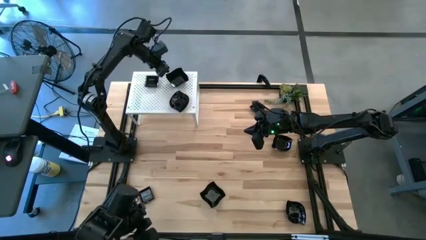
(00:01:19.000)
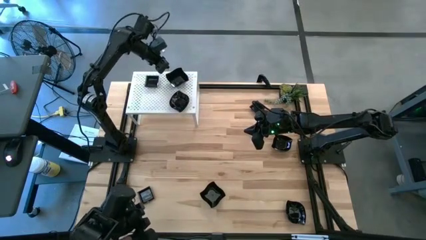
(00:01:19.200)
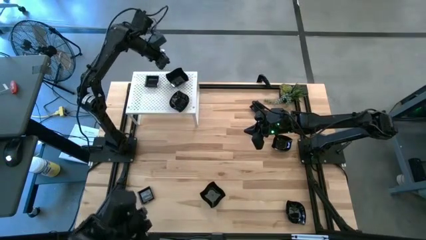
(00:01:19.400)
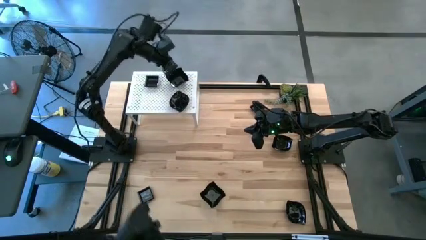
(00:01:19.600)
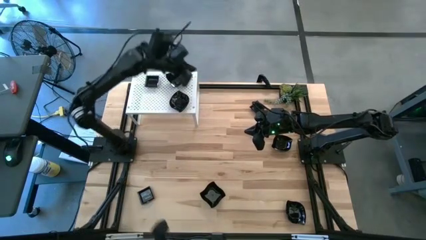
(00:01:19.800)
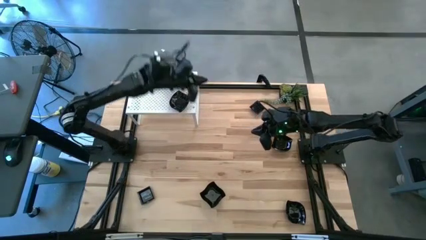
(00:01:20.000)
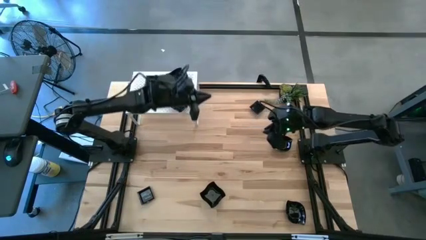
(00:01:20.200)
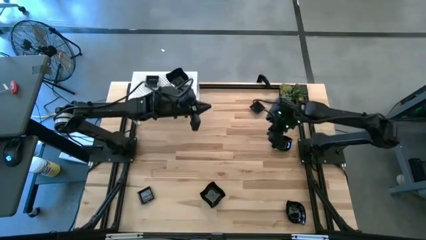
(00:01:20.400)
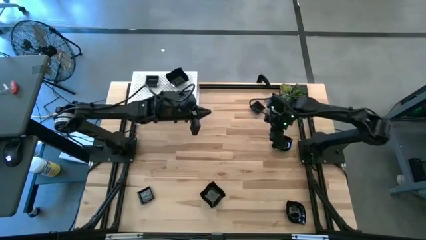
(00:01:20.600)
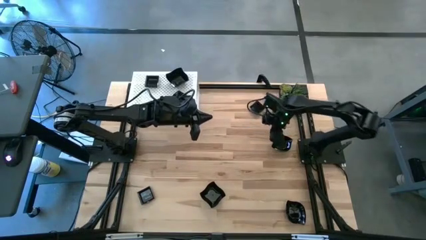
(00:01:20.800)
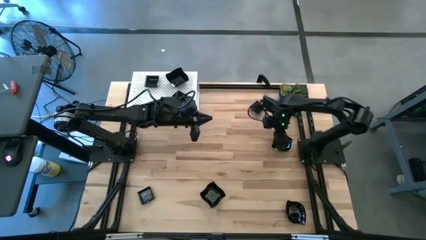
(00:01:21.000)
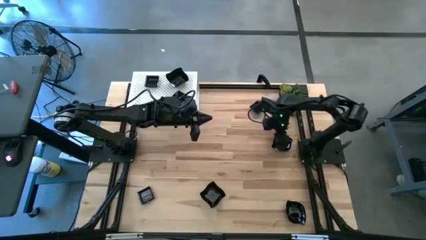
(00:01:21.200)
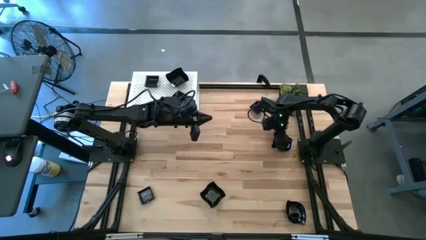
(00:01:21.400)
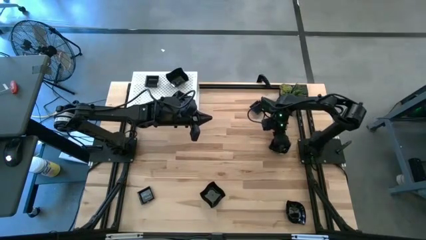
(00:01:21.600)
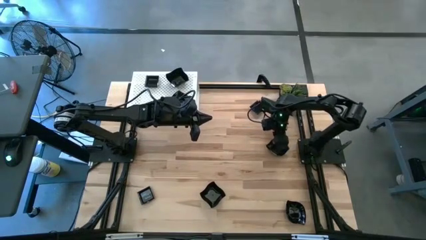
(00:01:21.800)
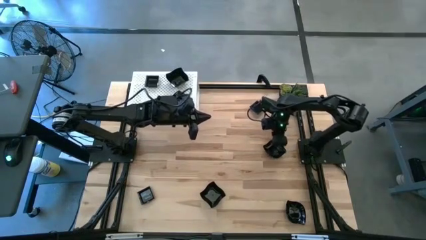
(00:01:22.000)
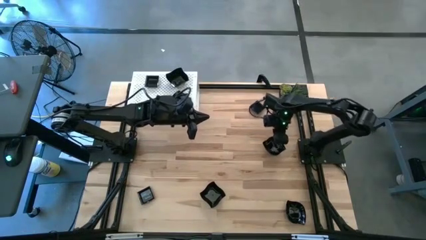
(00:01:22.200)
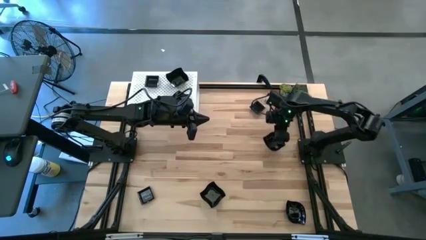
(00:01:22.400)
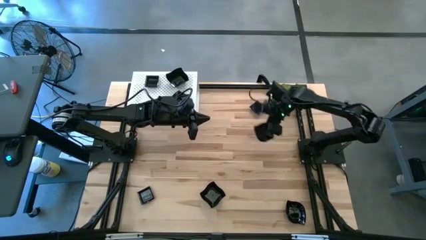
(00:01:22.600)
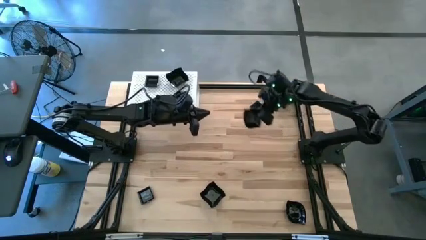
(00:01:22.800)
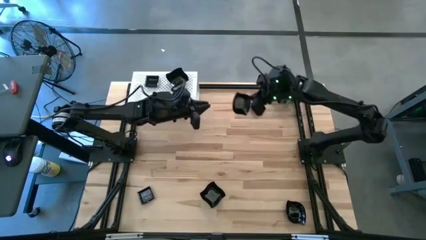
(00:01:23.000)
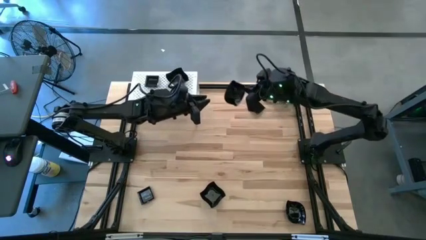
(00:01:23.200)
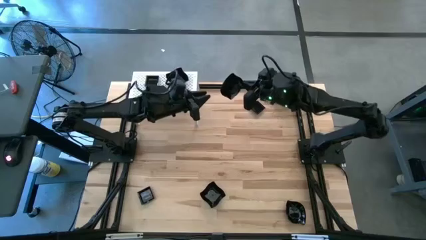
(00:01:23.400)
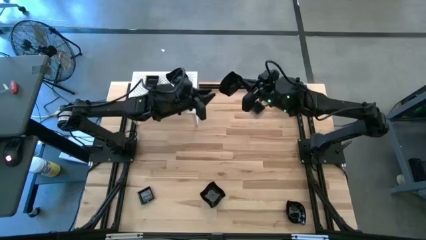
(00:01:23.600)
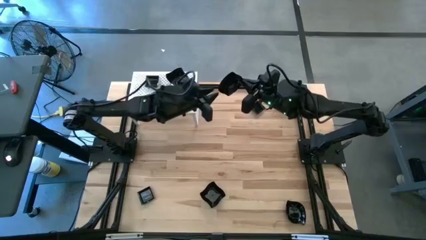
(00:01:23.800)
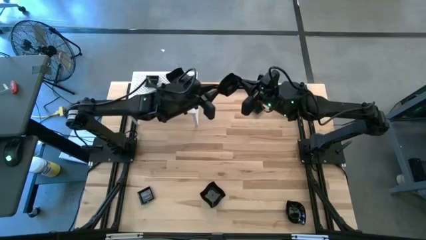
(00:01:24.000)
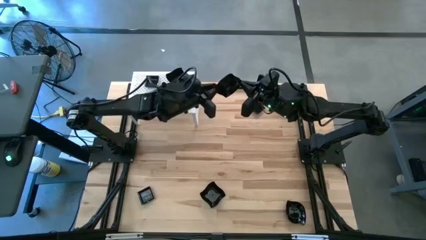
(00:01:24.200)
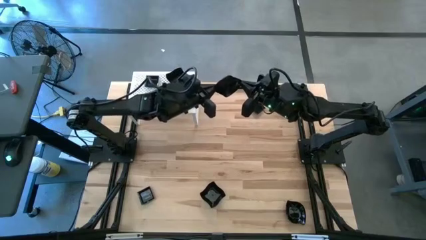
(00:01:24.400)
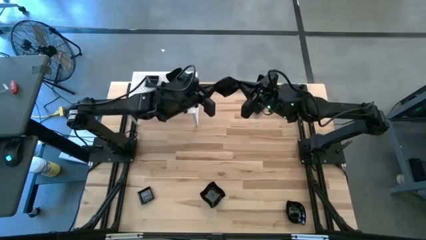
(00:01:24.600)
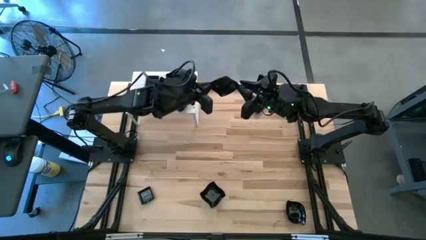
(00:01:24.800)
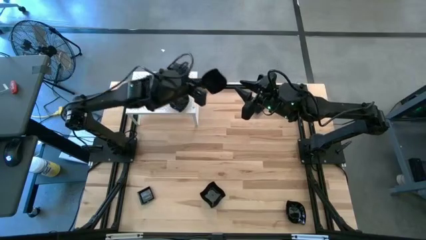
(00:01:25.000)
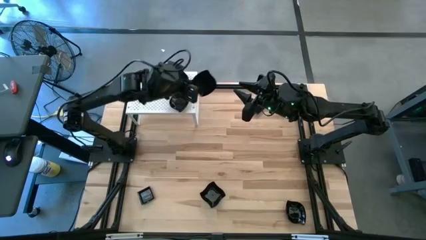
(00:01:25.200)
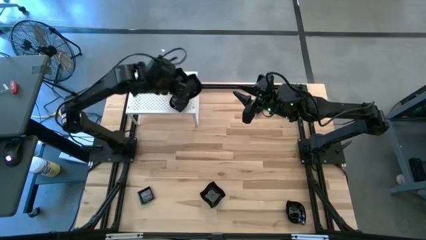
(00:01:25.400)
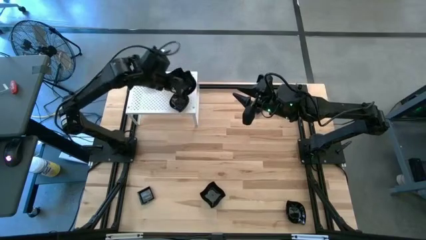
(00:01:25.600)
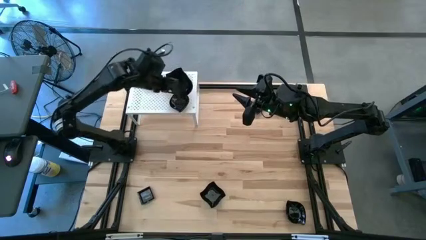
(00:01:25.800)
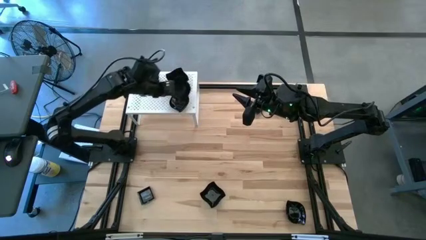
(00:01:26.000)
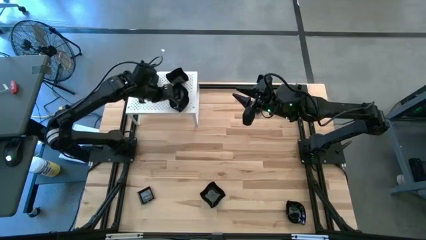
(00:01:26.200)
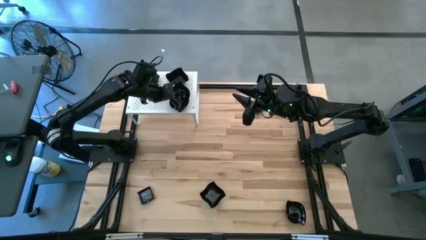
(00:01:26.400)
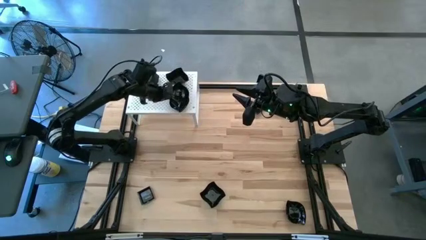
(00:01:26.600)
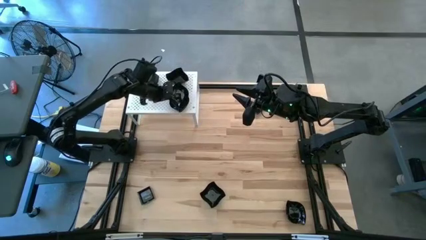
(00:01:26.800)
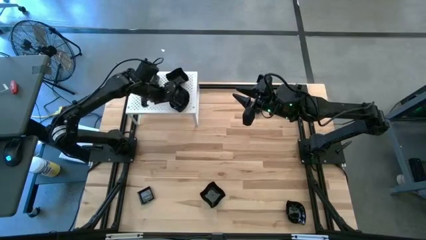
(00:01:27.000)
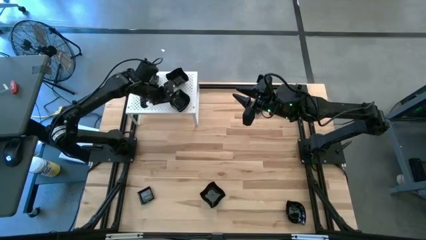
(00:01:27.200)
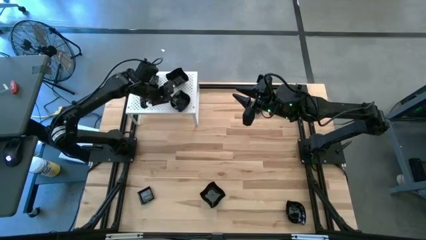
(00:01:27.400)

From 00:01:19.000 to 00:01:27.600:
Task: Pick & Place Mini shaped plates
Stack the black leaf shaped plate on top of the other black leaf shaped plates on the shelf

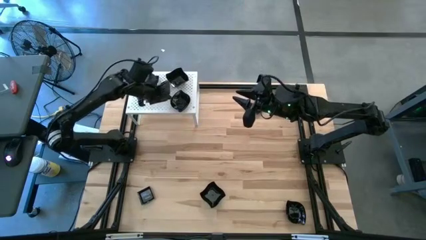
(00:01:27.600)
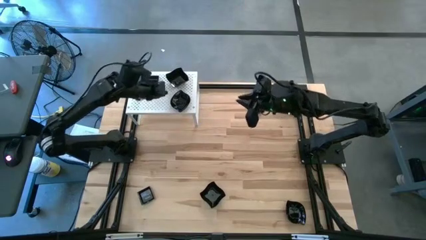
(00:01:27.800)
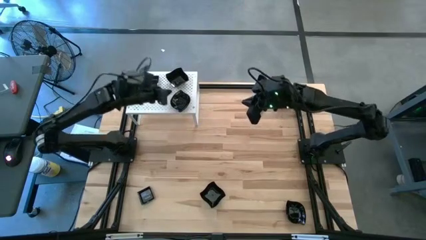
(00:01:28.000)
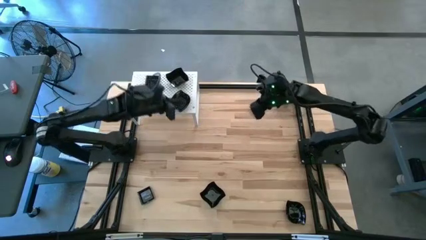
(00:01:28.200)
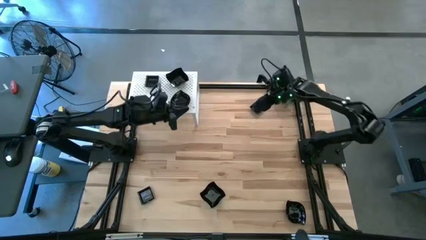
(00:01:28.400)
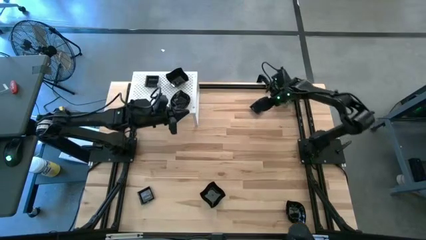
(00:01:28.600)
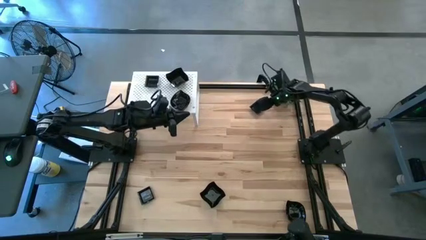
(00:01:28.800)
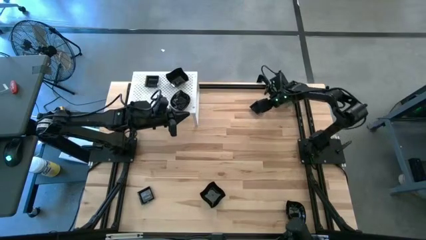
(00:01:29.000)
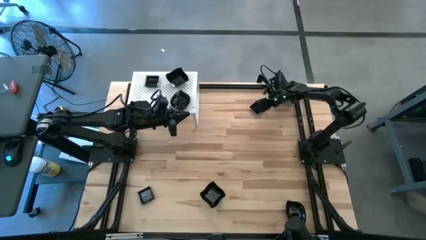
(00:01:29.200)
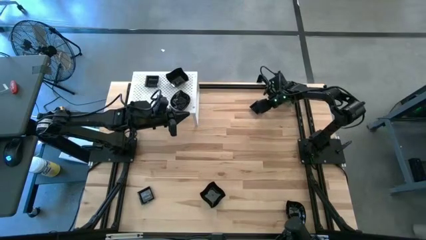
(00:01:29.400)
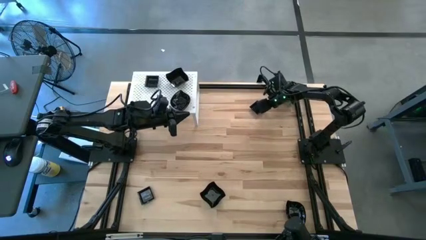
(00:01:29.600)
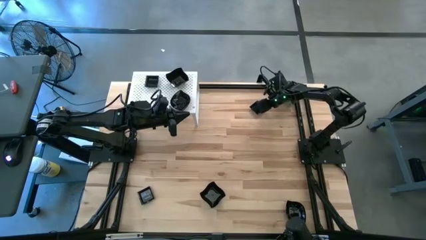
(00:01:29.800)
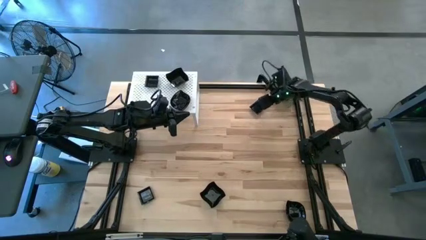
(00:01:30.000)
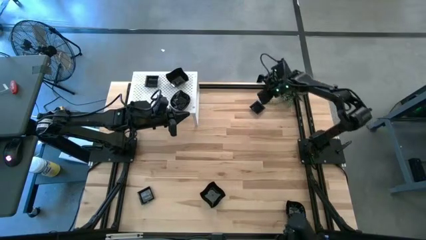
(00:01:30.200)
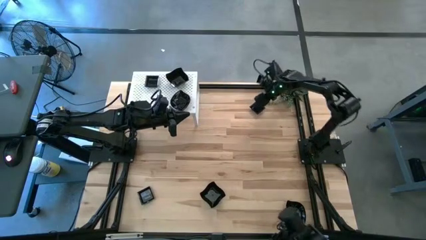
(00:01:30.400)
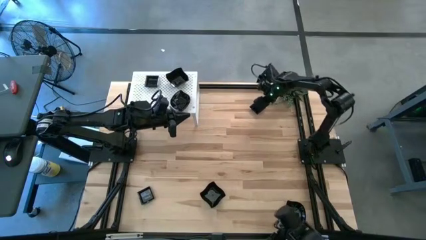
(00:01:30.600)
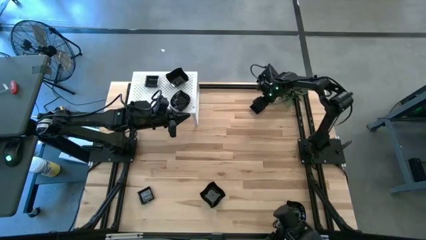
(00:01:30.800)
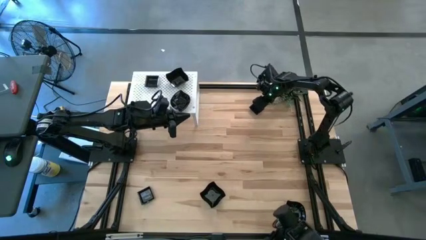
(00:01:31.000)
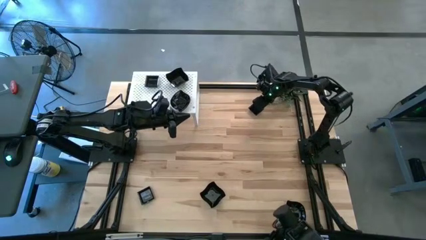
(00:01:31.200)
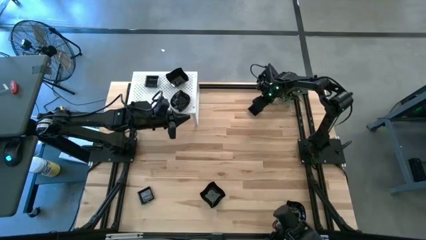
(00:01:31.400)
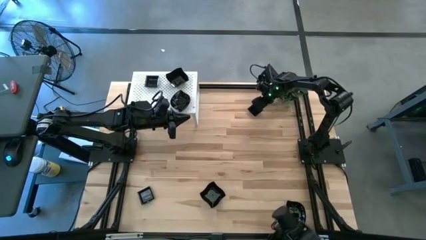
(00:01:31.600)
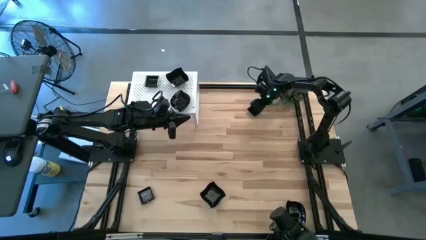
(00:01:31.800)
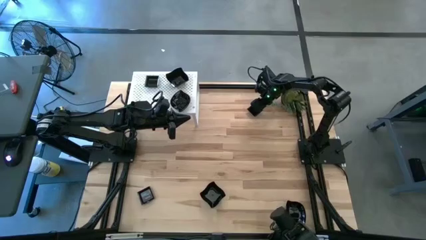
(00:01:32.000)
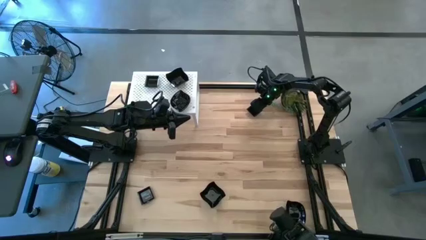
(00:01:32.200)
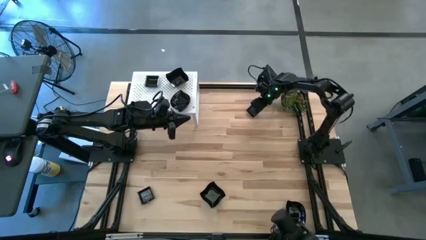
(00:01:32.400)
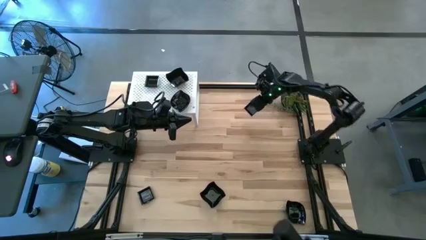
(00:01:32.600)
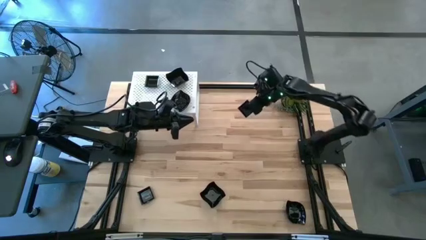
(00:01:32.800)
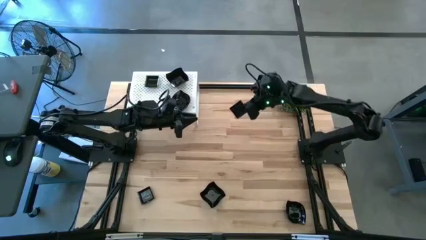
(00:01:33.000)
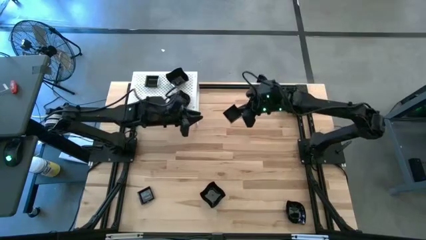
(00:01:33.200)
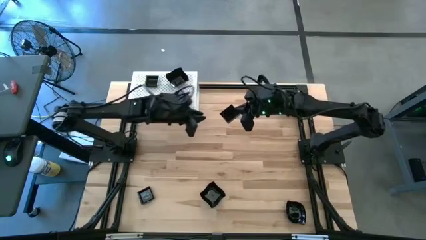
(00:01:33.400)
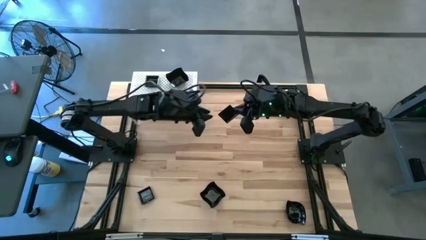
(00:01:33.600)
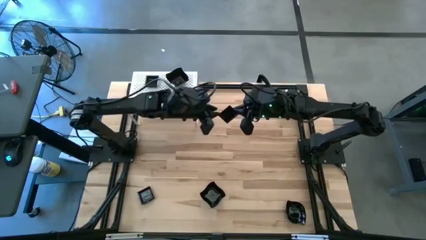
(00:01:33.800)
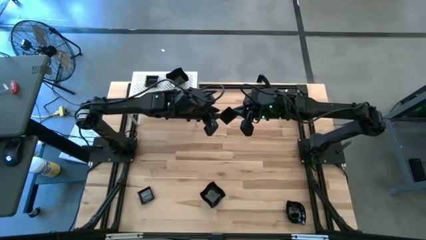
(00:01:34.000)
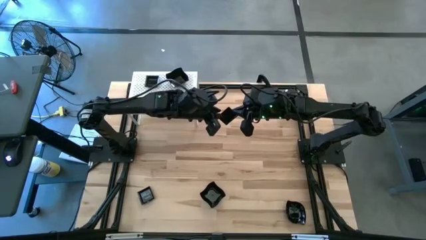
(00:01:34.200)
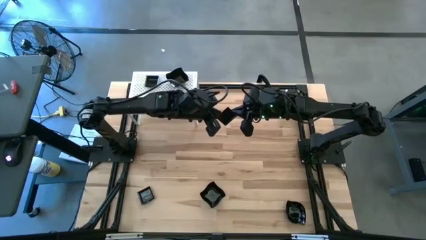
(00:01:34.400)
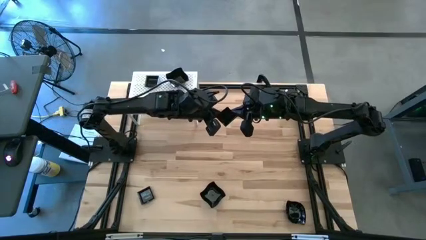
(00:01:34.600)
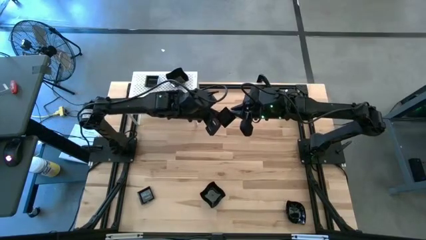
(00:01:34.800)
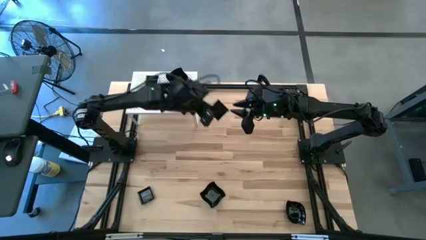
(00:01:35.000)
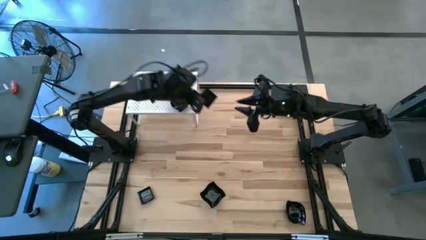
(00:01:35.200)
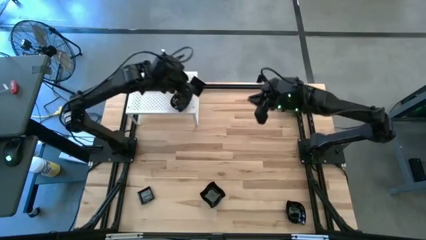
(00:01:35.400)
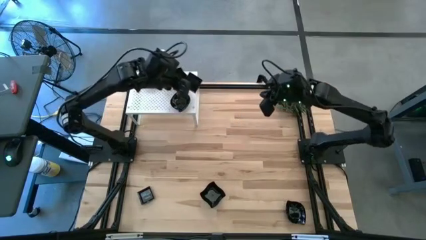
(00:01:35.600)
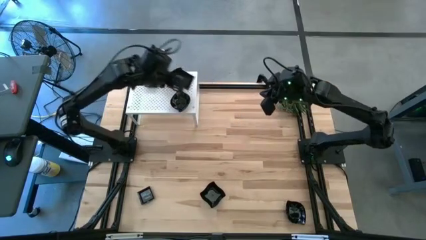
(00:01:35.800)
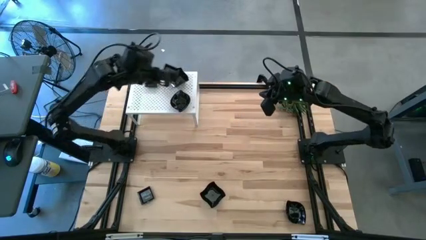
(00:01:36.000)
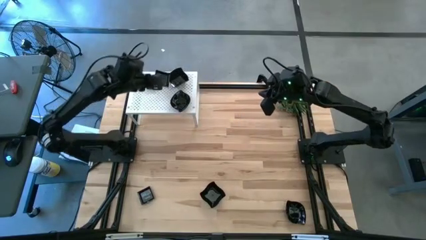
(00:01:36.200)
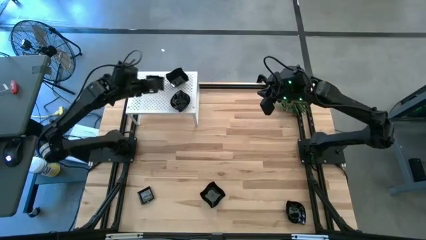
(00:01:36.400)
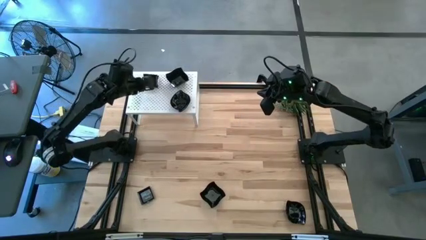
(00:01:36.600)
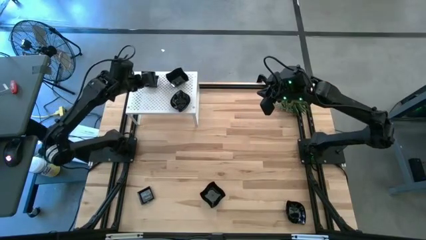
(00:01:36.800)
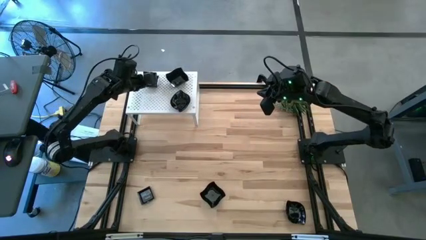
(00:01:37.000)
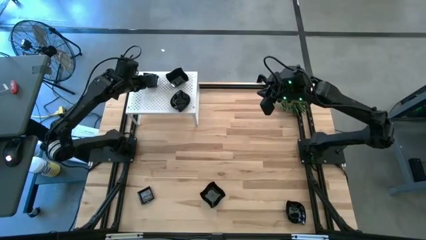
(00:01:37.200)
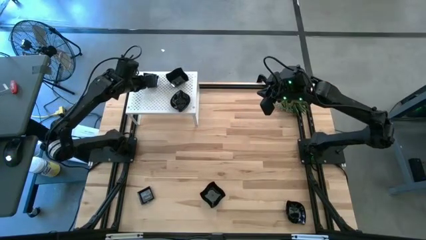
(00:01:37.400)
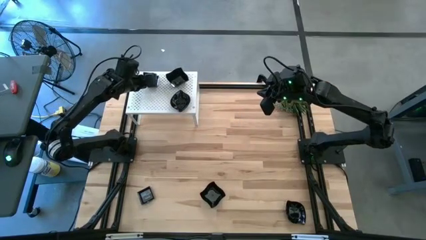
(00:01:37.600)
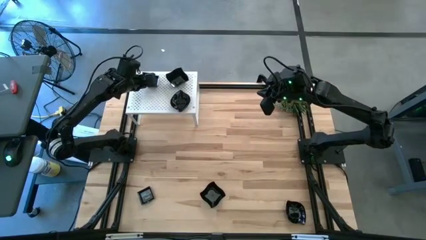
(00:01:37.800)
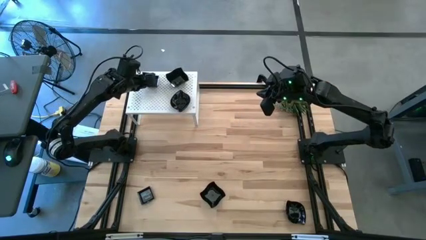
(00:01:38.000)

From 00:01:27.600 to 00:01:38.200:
Stack the black square plate on top of the other black square plates on the shelf
